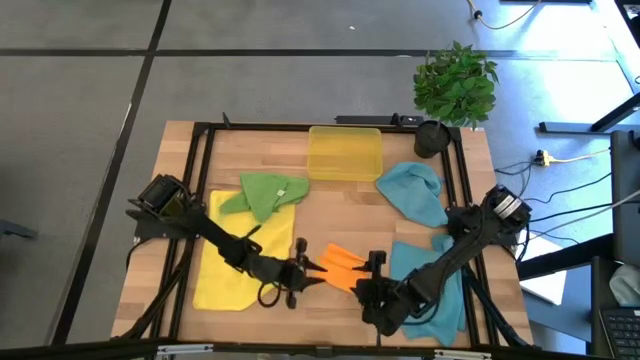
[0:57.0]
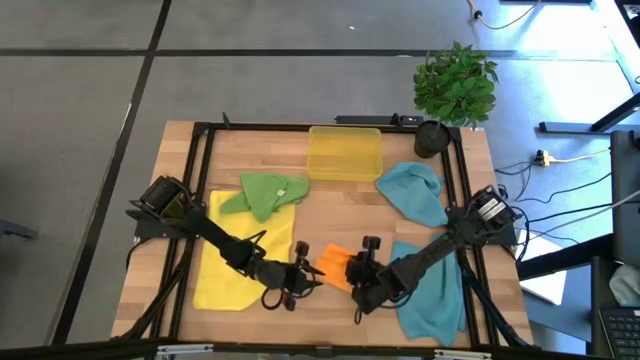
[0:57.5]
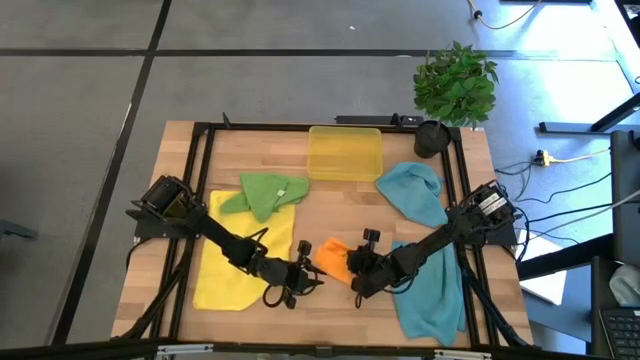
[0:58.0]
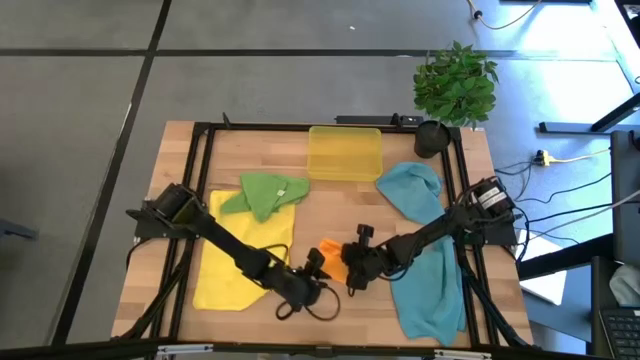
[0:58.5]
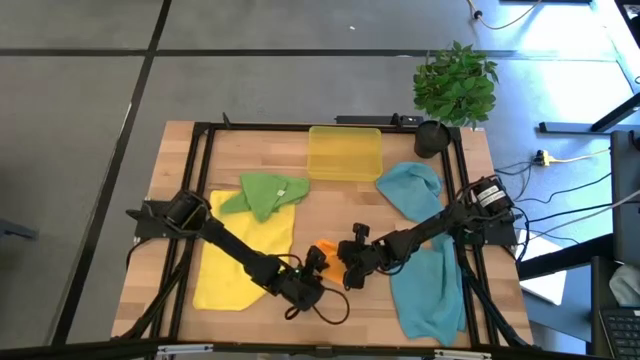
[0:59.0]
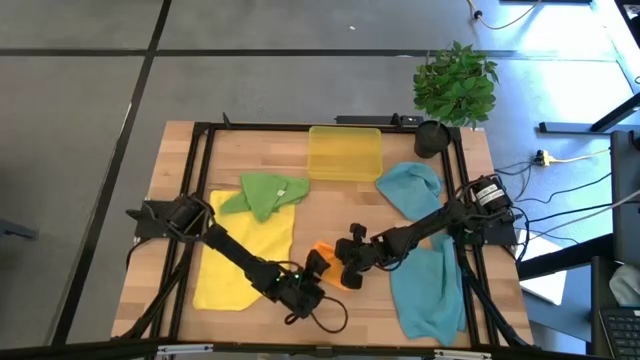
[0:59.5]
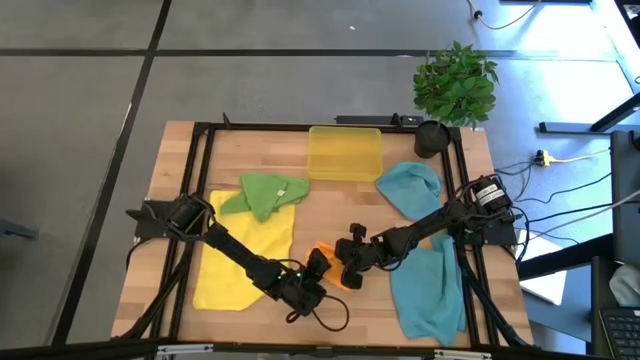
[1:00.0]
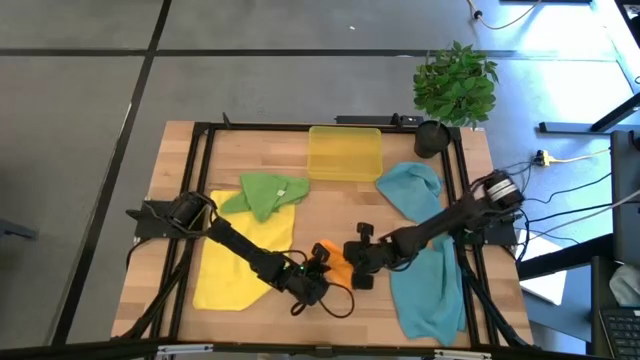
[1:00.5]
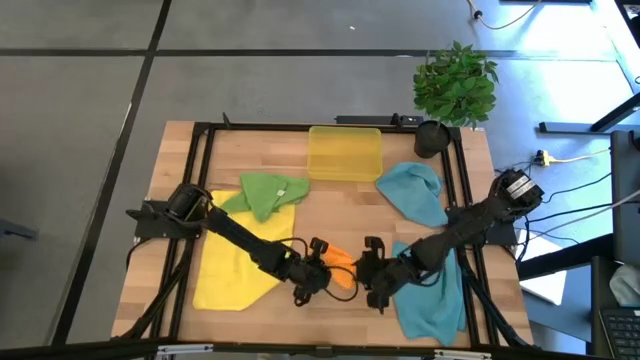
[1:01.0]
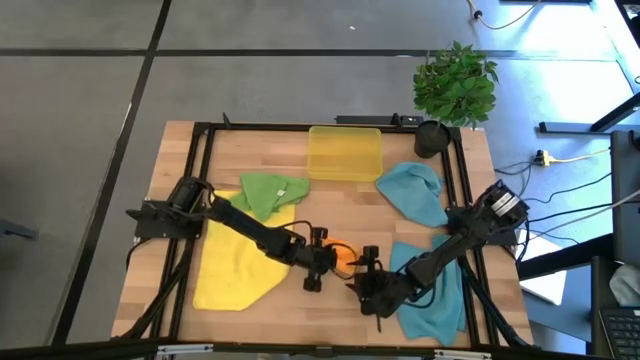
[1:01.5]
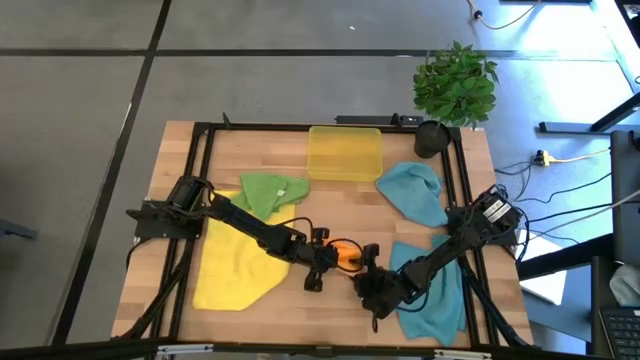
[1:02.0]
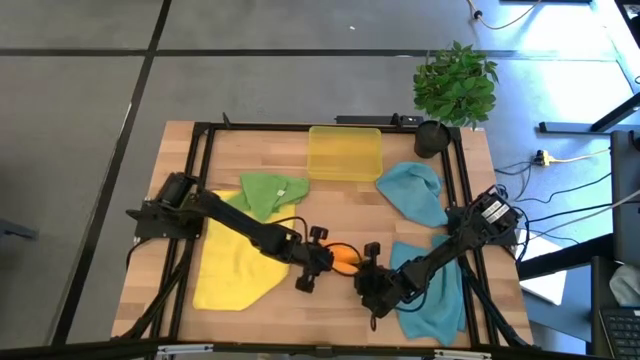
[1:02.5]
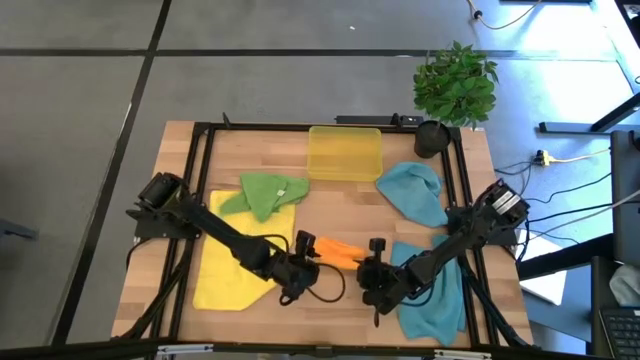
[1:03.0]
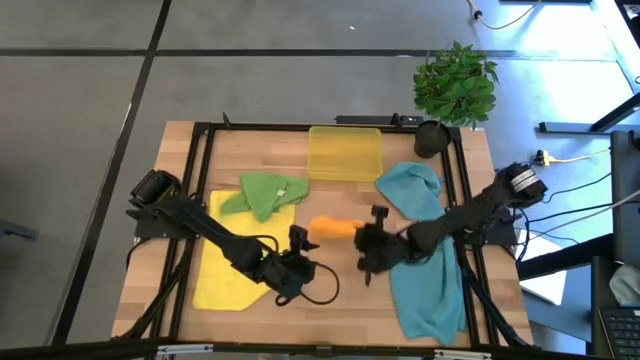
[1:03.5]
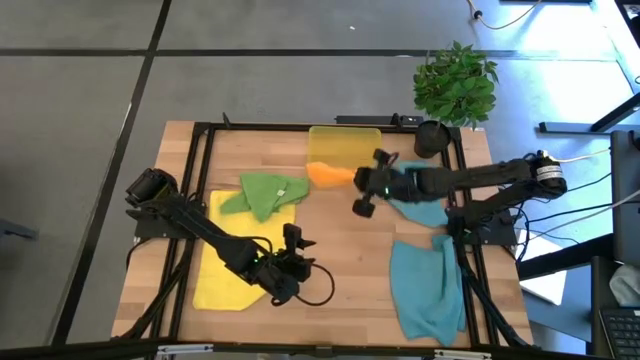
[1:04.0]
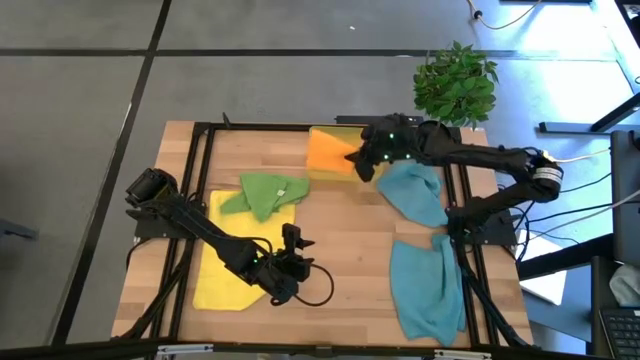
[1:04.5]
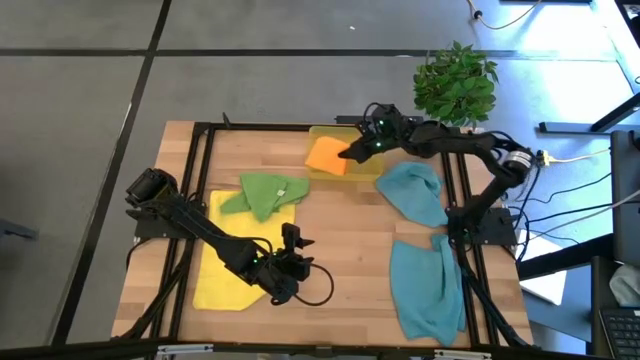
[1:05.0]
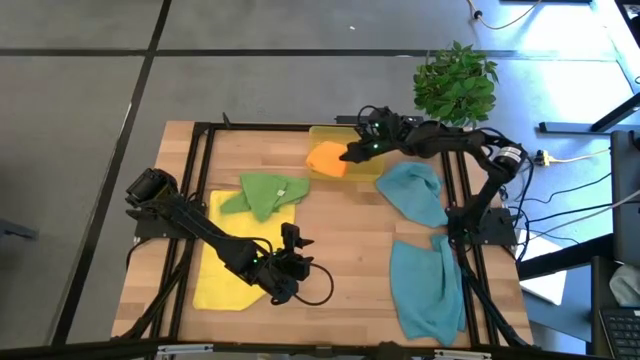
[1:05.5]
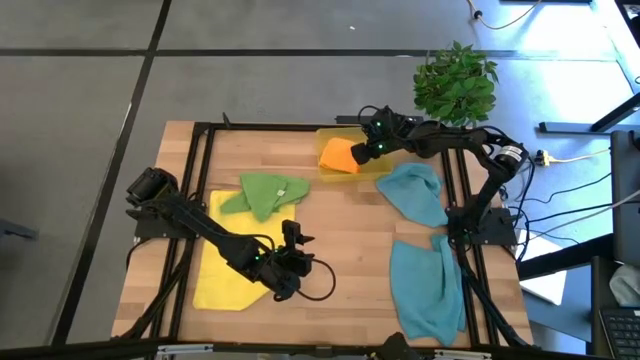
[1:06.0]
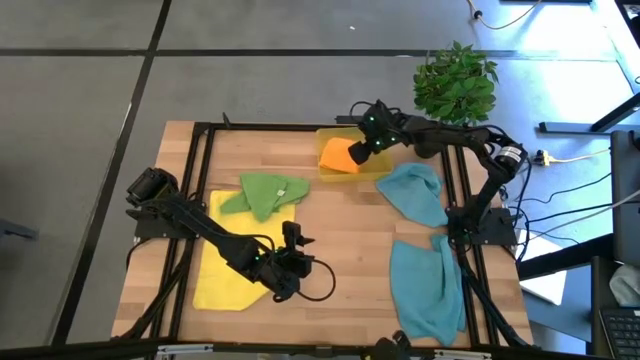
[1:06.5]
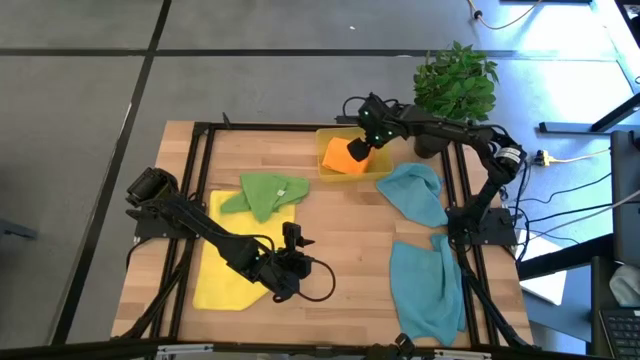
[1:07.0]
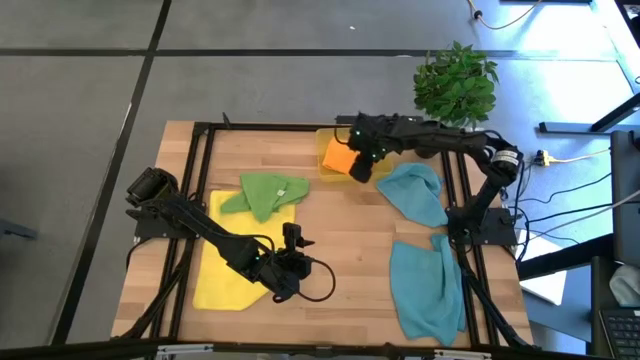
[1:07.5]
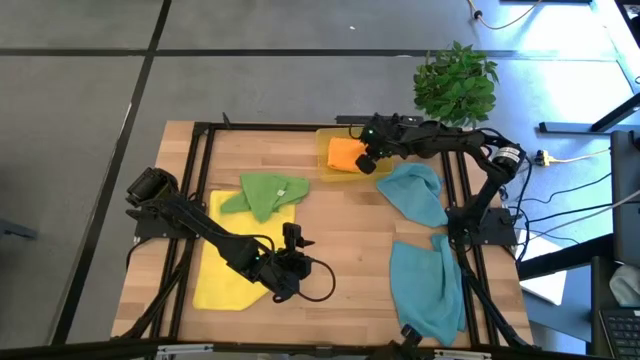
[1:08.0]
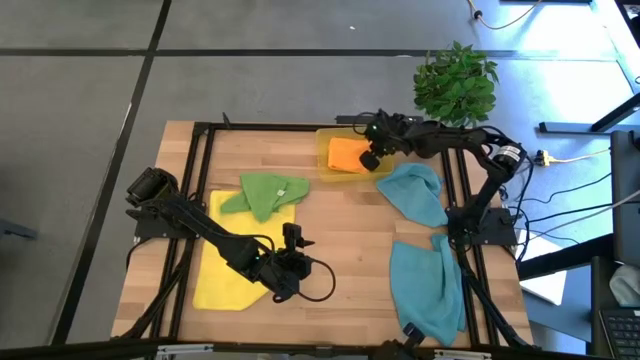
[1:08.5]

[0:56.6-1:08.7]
Task: Fold microfiber towels
Put the folded orange microfiber cloth into the yellow bin

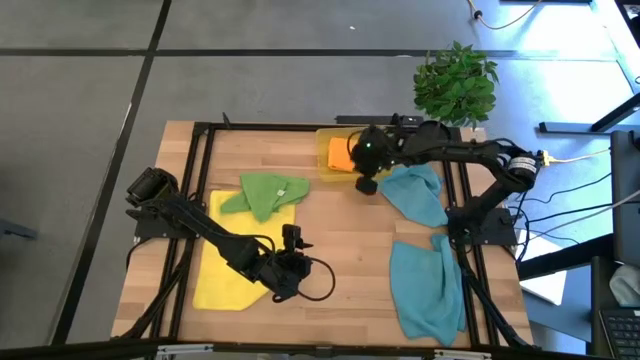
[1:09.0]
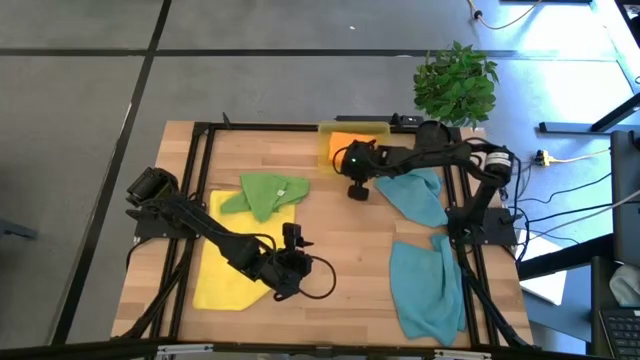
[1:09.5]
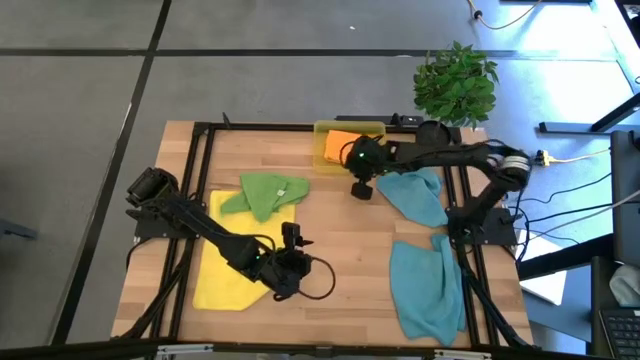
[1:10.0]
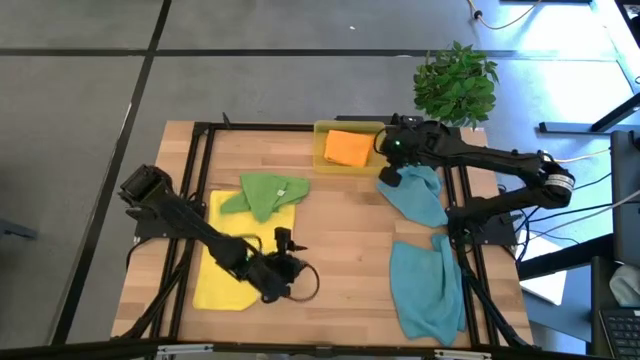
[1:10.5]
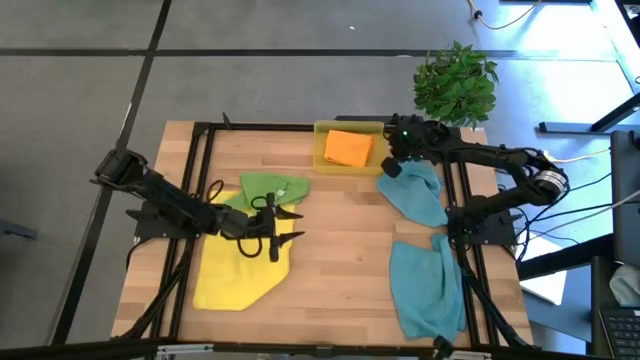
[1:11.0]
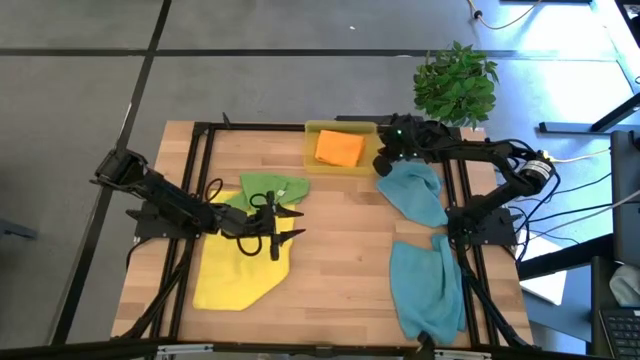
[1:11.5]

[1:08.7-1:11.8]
Adjust the yellow bin

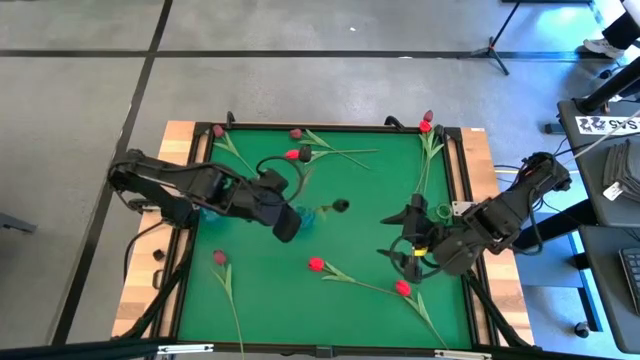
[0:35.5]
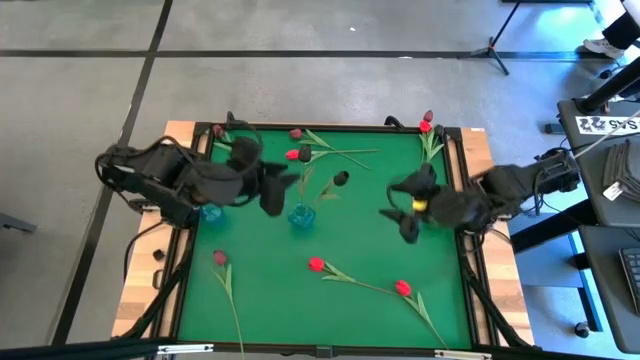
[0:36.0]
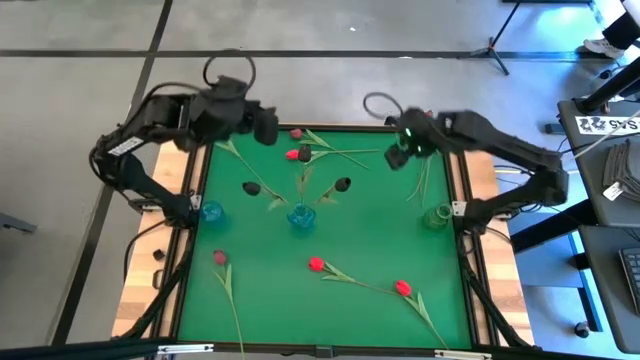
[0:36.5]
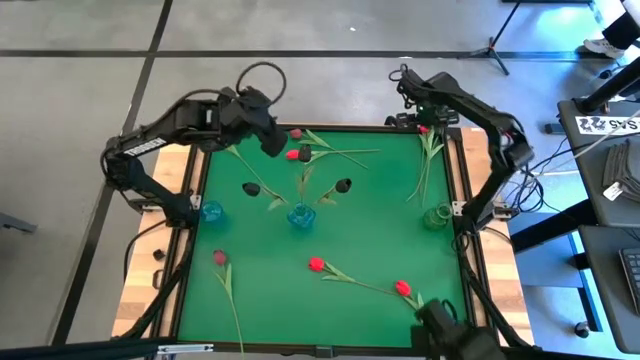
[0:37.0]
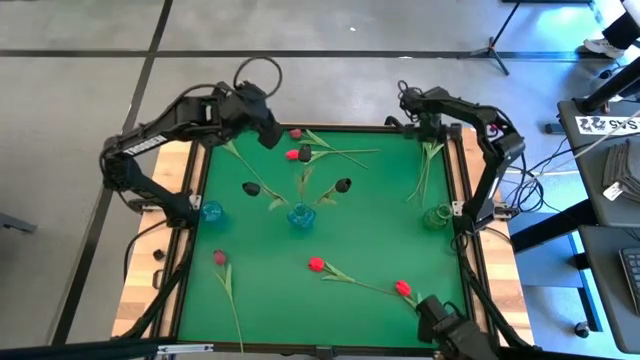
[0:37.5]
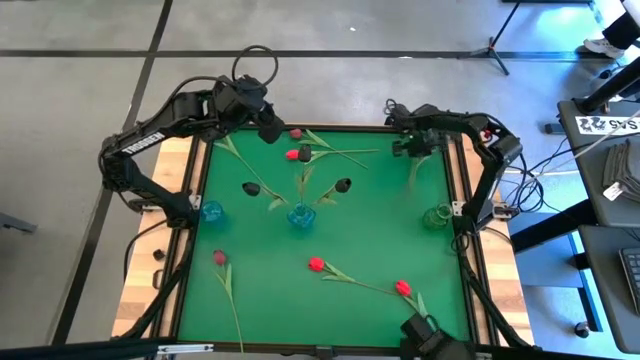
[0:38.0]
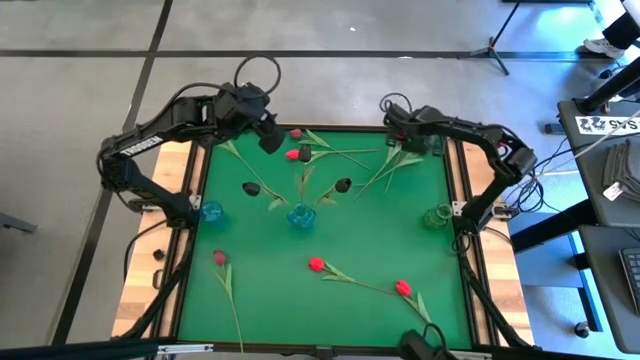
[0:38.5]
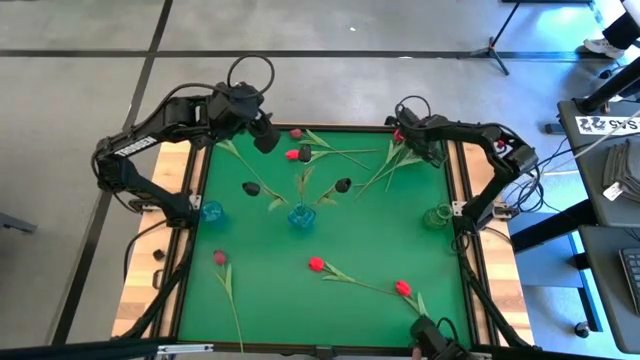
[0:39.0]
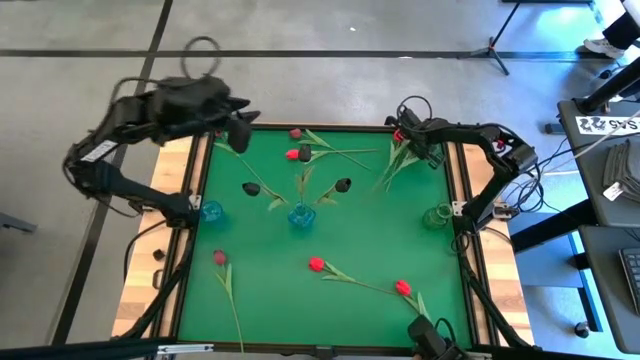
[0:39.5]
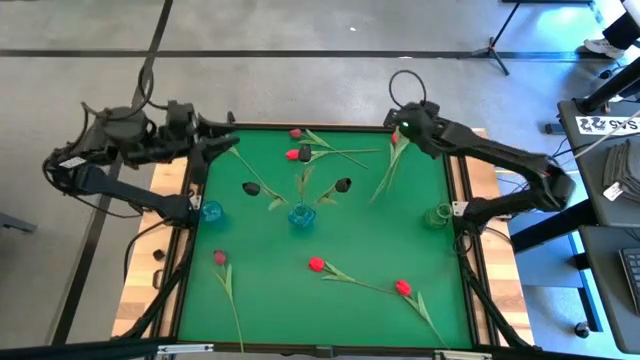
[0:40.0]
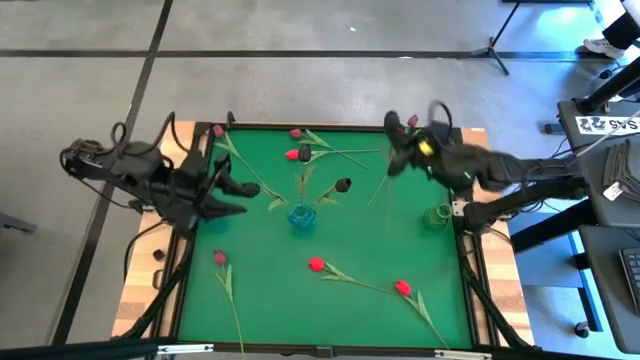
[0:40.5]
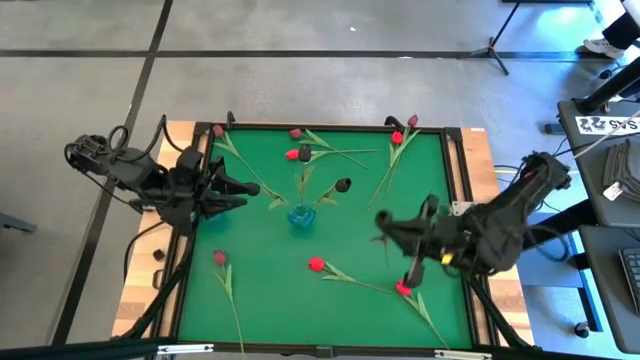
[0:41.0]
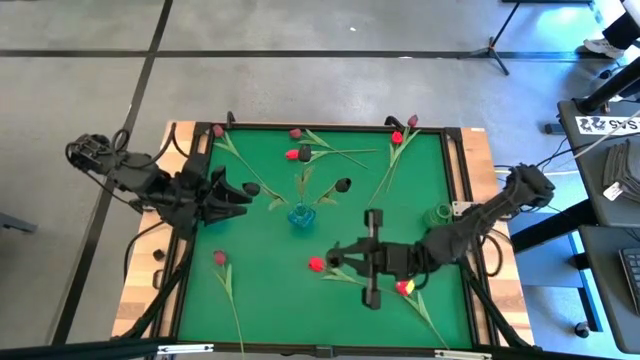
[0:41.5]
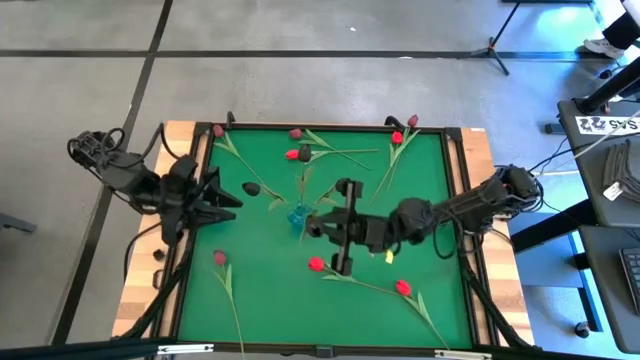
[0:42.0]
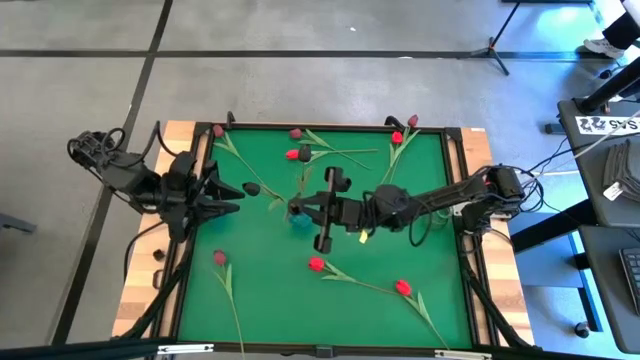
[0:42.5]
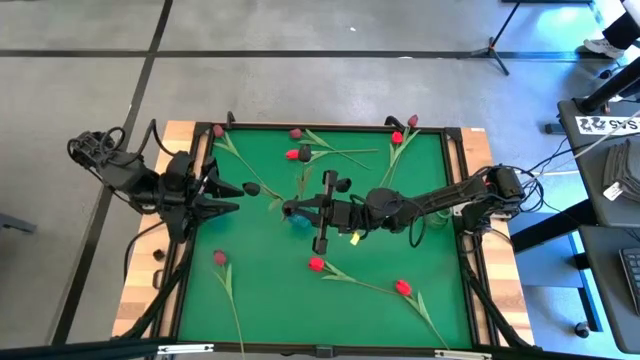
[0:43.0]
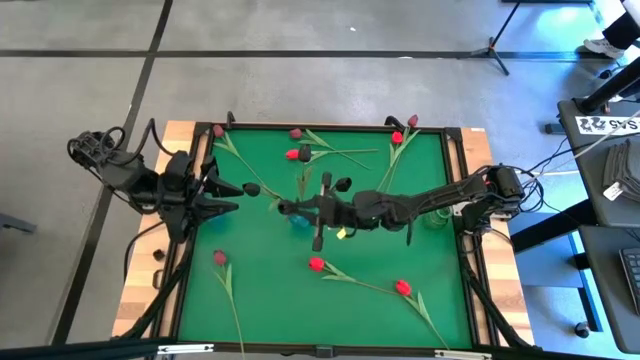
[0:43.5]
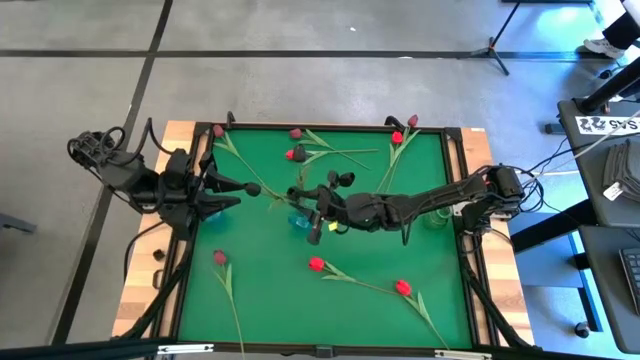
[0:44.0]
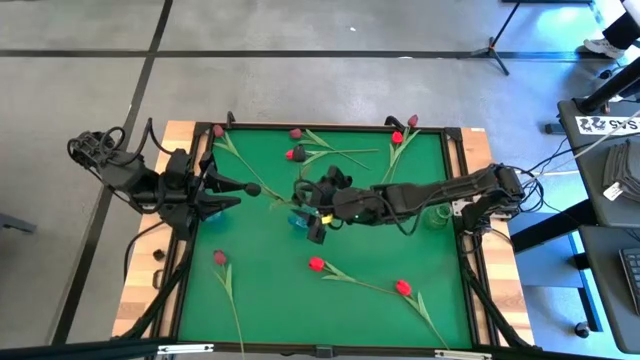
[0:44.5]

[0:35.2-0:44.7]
Task: Sort flowers into vase by color
Put the black tulip into the right blue vase
